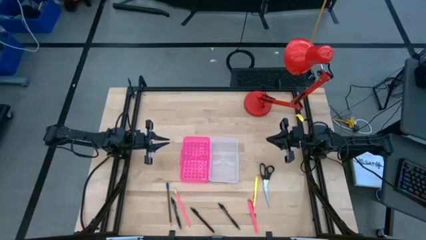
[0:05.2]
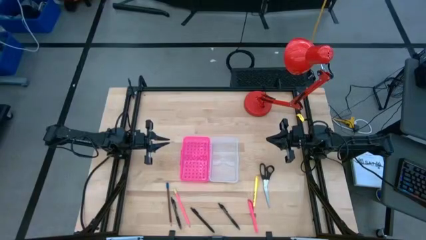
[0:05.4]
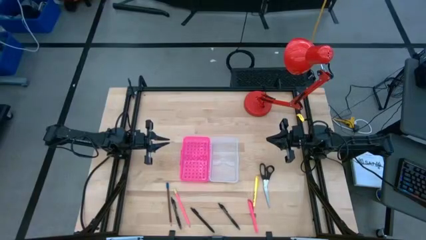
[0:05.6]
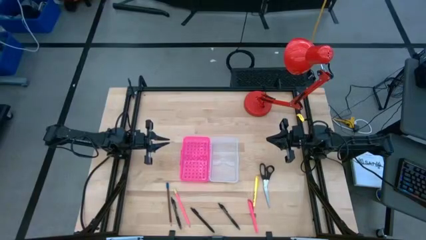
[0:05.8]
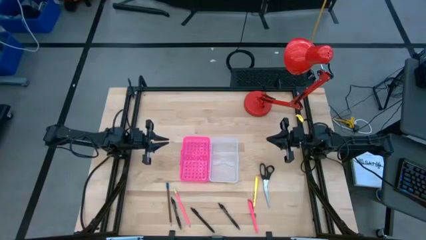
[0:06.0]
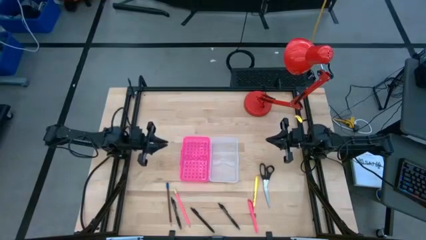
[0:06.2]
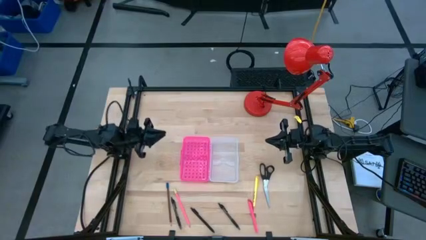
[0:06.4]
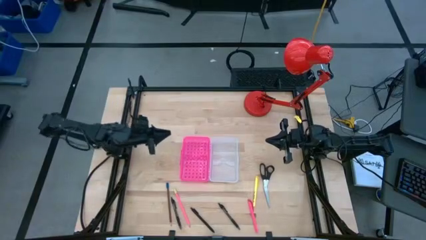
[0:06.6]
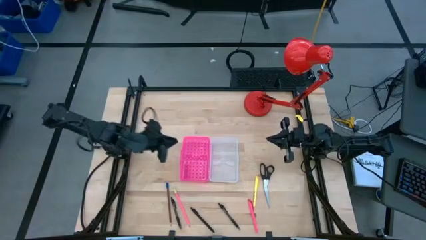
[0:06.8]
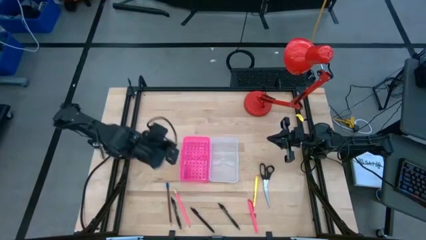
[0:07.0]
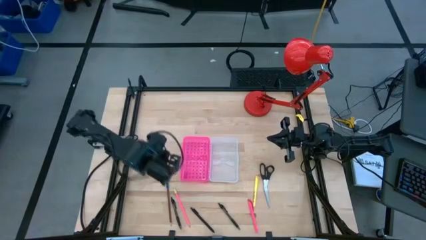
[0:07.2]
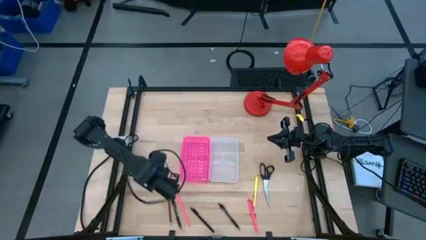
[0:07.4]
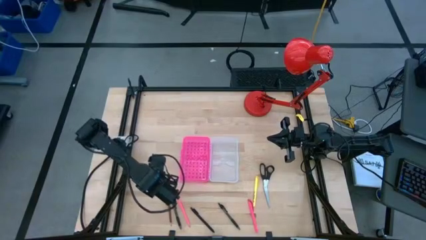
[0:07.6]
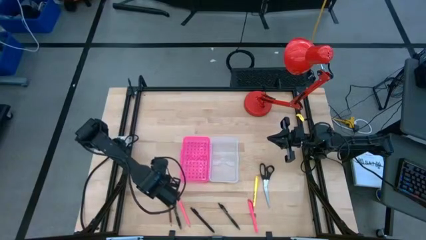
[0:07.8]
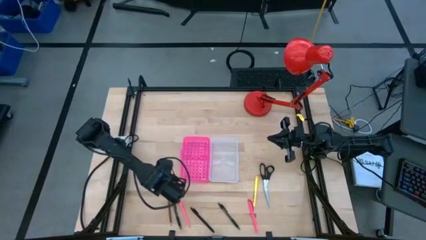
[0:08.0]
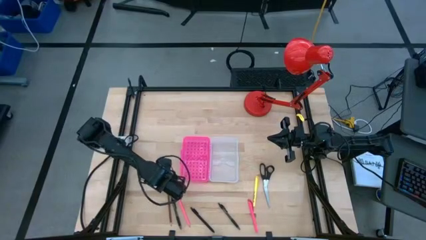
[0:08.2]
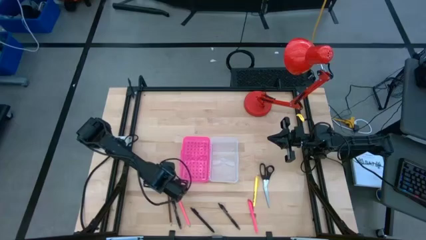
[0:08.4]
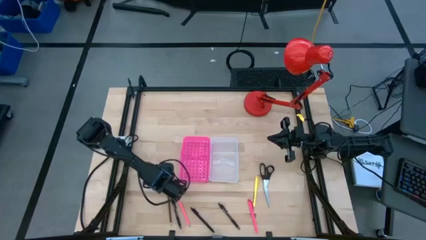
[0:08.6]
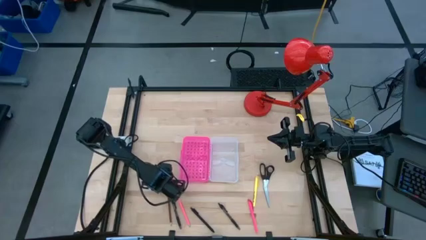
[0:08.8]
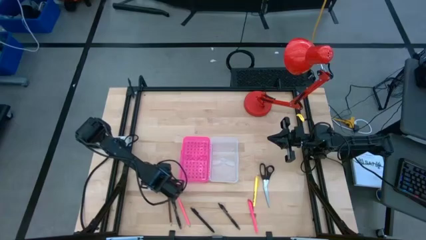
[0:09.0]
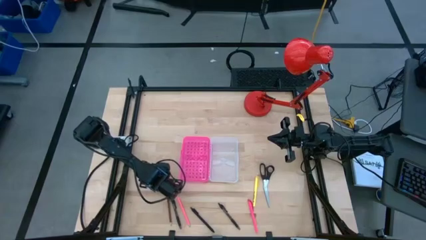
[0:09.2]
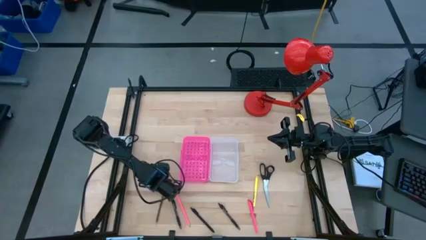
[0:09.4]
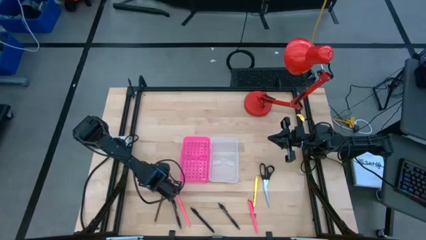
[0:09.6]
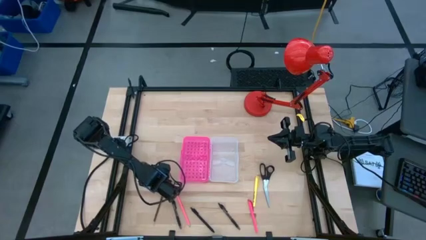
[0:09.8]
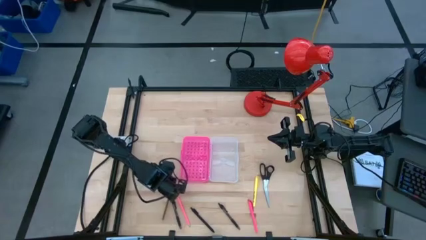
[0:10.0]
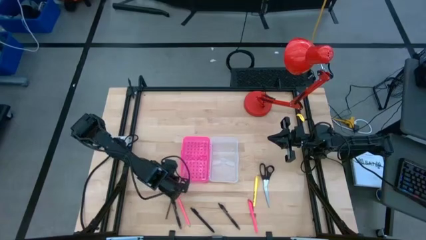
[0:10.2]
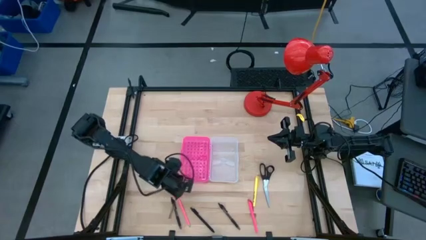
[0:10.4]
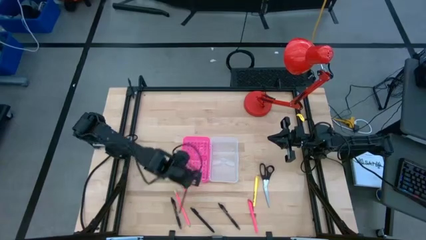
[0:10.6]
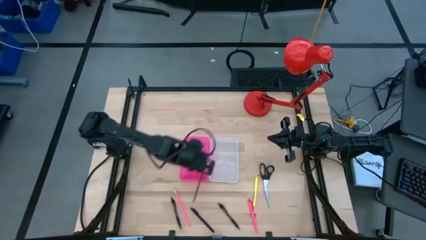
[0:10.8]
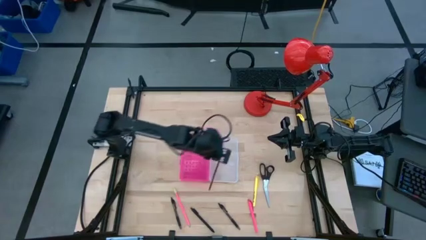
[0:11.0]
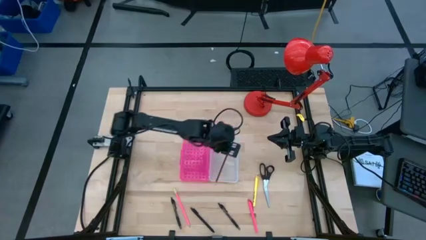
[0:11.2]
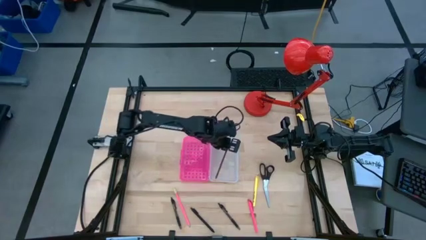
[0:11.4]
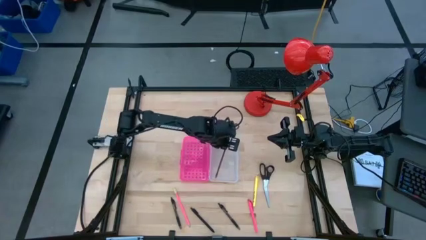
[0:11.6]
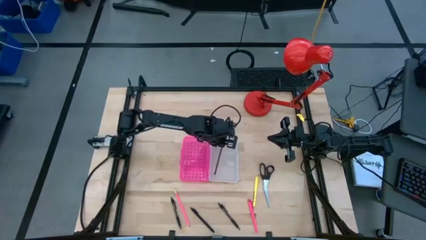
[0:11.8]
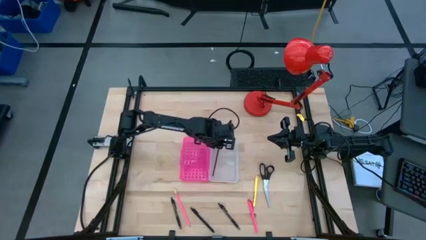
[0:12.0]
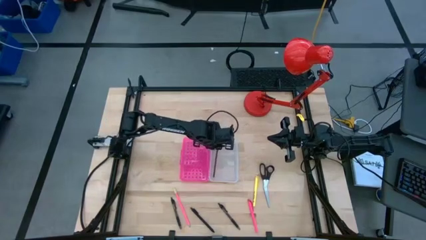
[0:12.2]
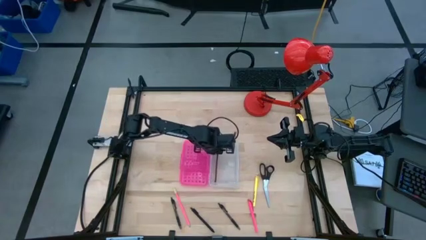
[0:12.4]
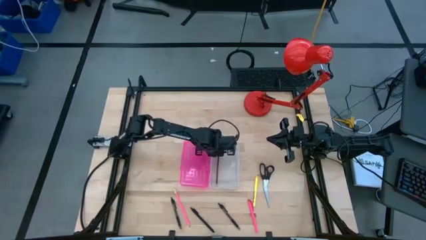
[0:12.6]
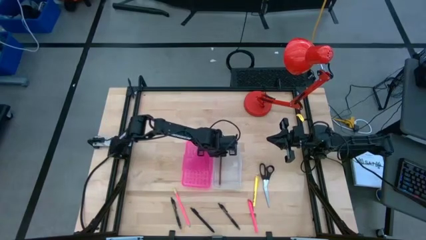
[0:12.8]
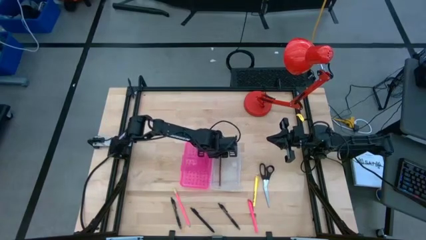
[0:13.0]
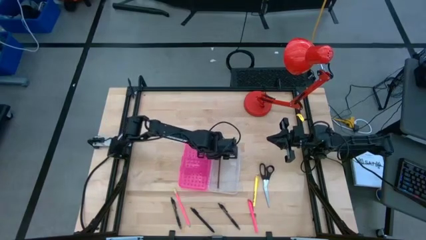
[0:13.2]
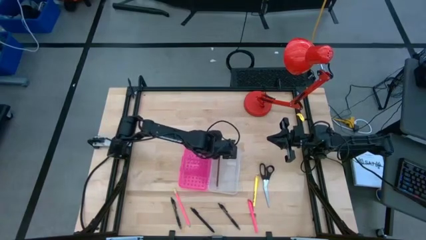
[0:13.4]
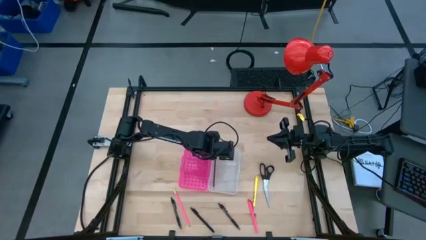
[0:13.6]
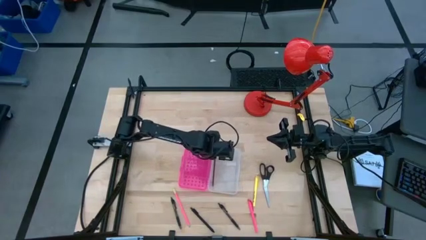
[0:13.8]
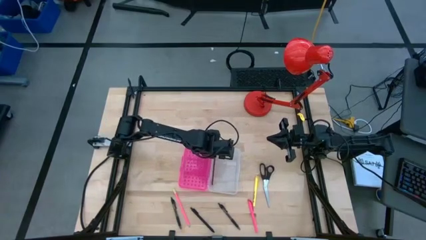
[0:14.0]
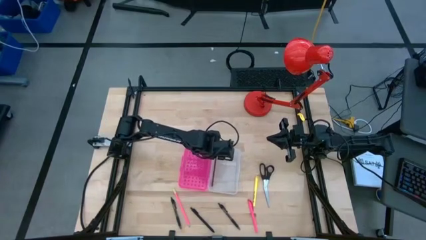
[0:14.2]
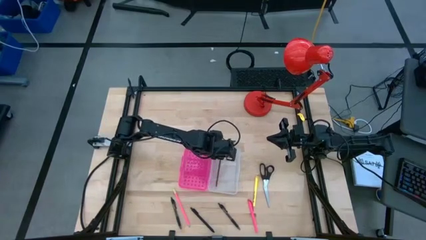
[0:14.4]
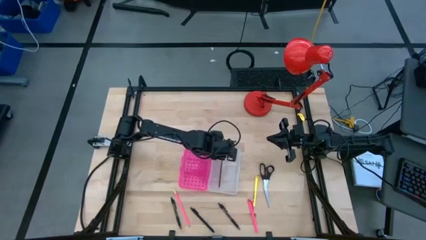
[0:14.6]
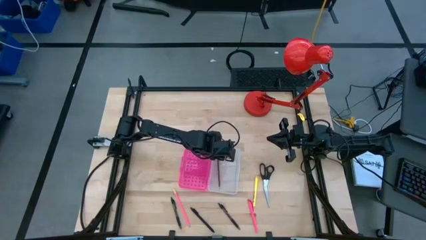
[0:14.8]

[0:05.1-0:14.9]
Task: Pick & place school supplies into a supply box
Put the brown pencil into the pink box

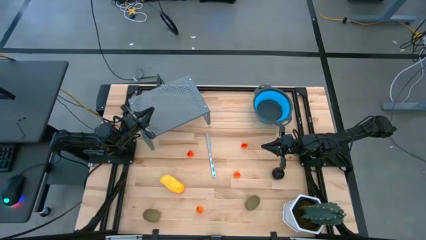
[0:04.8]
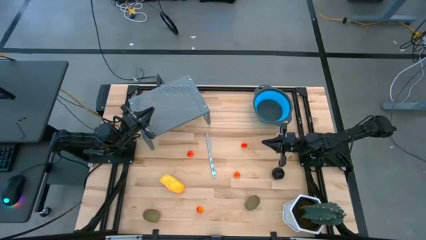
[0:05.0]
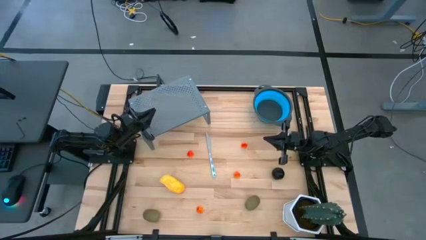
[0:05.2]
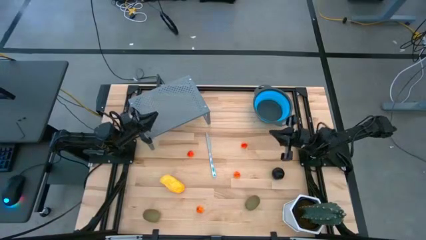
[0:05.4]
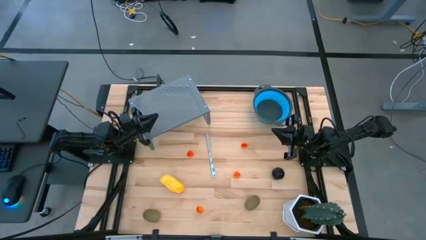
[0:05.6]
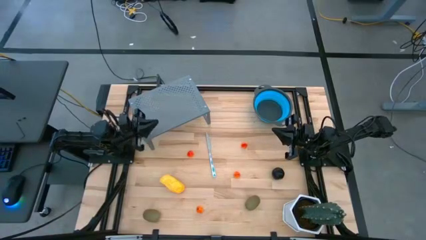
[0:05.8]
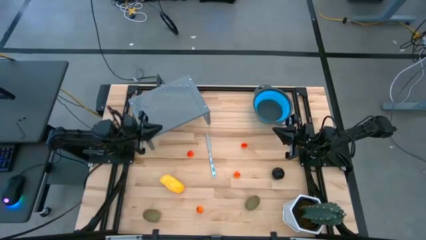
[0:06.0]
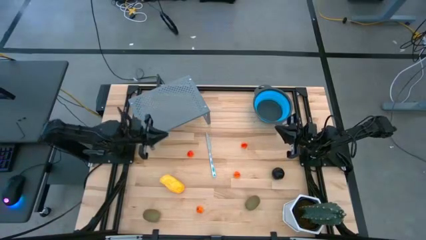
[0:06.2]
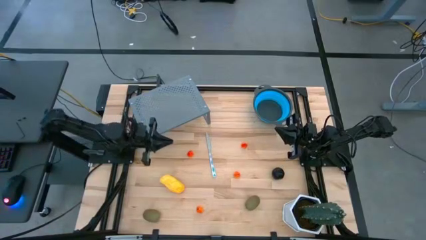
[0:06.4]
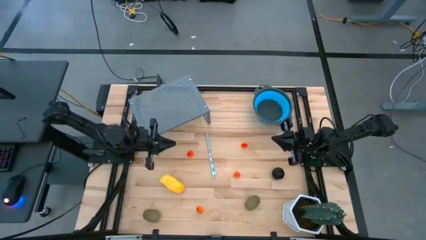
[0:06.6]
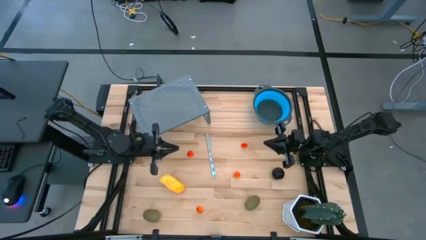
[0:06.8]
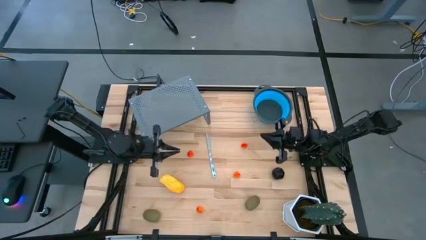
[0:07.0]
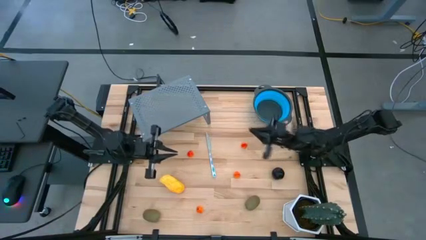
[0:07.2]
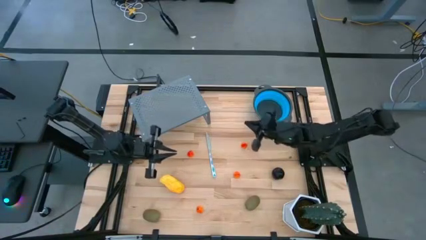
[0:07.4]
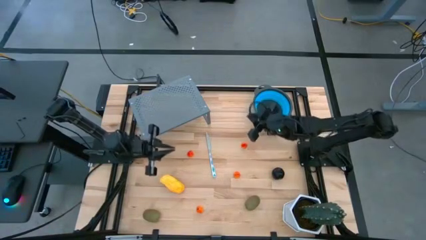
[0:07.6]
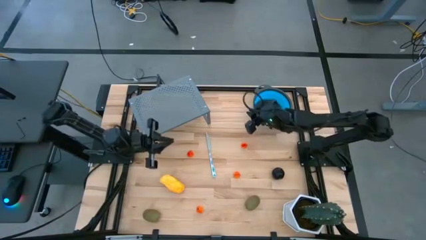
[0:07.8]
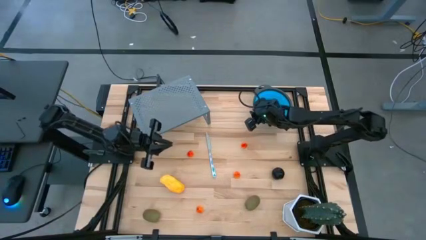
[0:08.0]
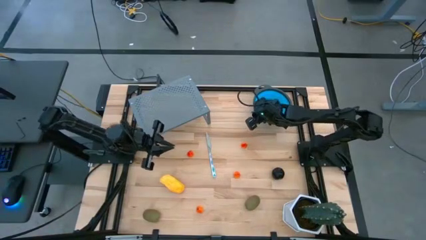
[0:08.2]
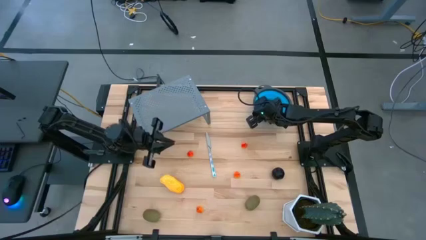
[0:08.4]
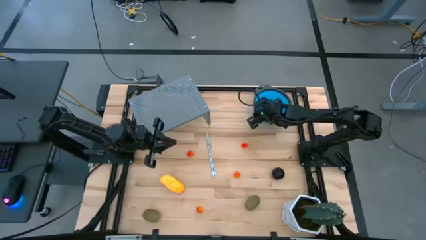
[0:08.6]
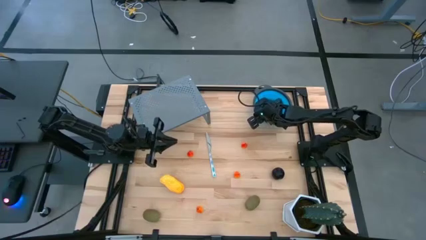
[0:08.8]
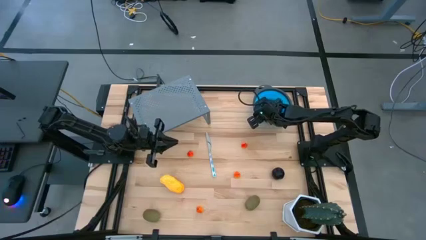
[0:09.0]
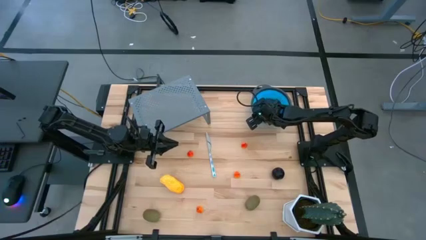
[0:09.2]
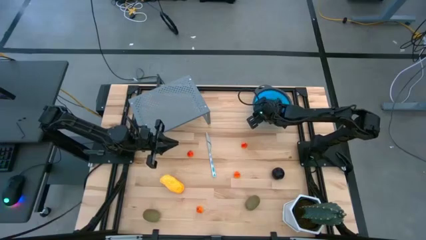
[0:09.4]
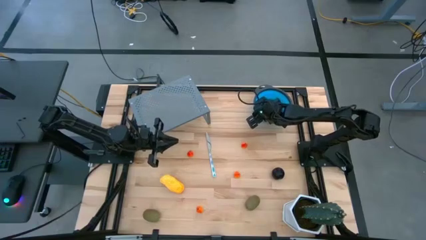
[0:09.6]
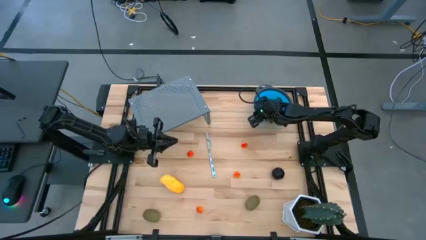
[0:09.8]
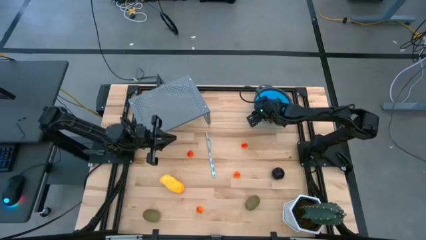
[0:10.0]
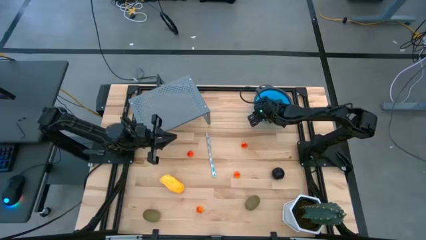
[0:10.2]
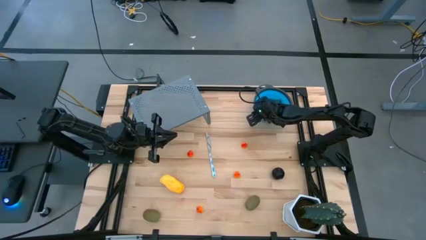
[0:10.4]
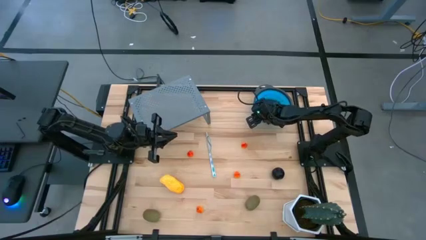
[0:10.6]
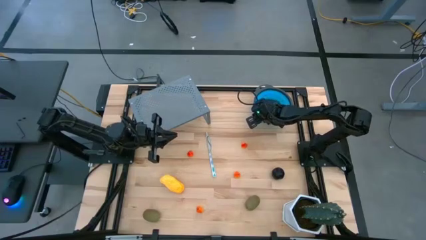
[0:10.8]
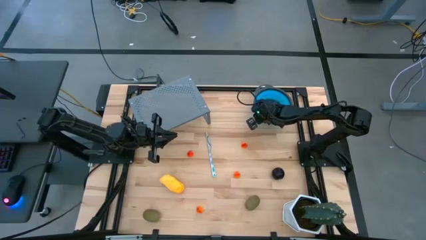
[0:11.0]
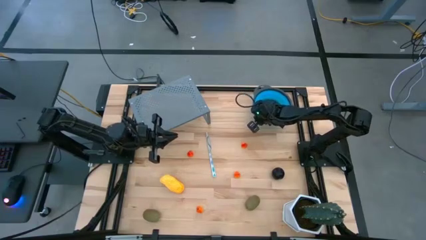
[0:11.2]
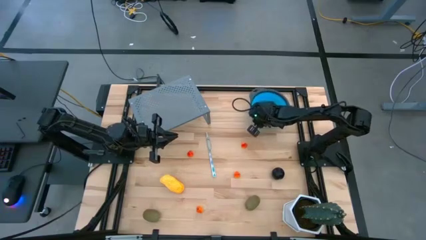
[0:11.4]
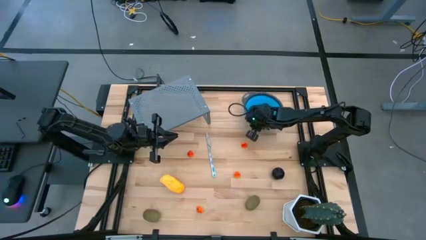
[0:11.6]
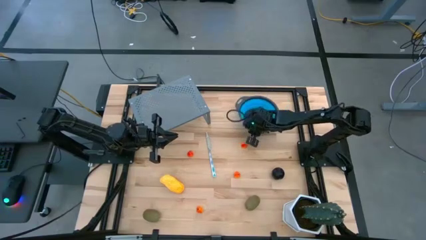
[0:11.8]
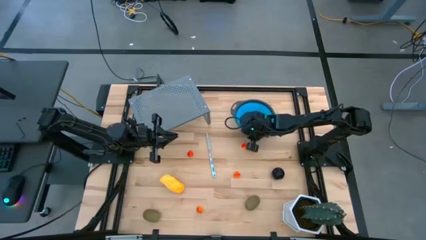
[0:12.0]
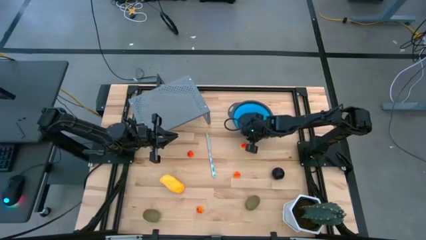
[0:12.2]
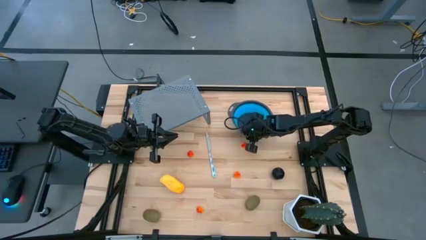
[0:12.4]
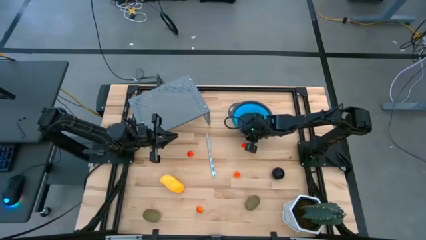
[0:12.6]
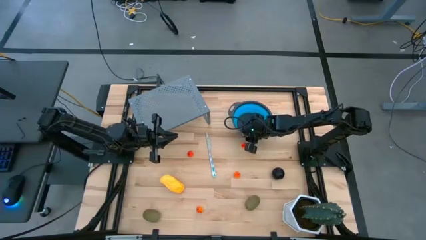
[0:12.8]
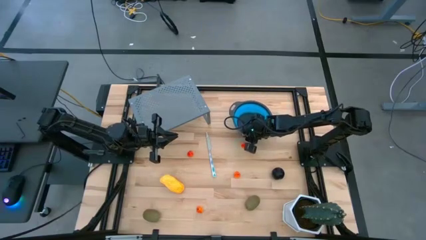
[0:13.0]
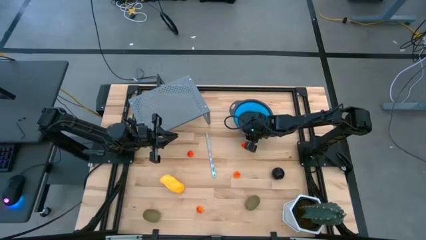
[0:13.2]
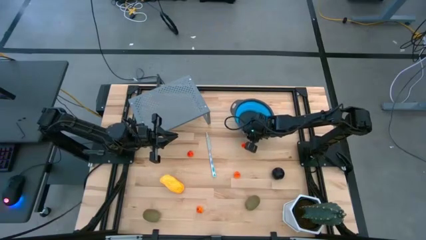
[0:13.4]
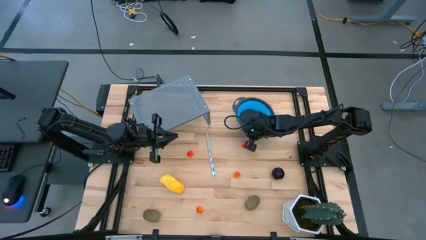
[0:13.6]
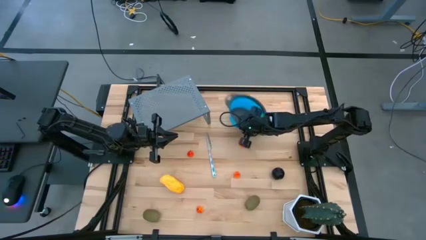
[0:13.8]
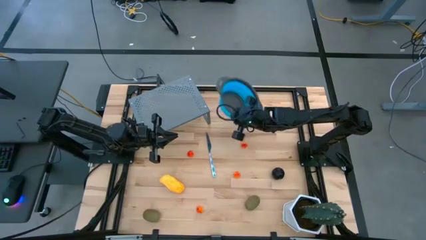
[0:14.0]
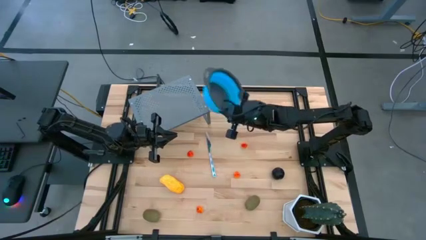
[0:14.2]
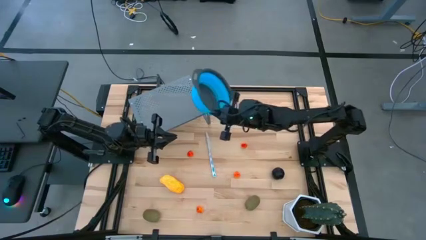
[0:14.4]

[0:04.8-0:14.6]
Task: Pick & Place Fruit
Put the blue strainer bowl on the shelf
